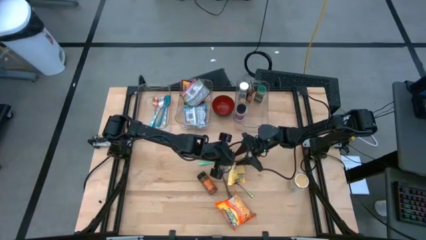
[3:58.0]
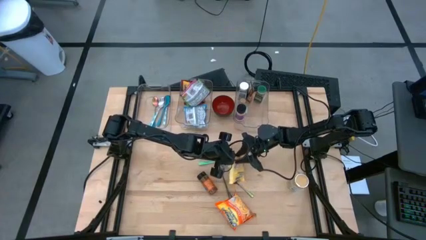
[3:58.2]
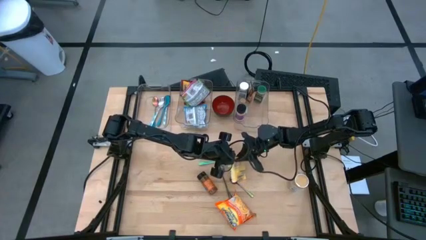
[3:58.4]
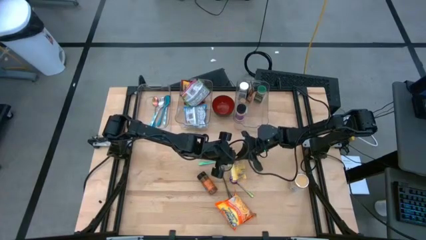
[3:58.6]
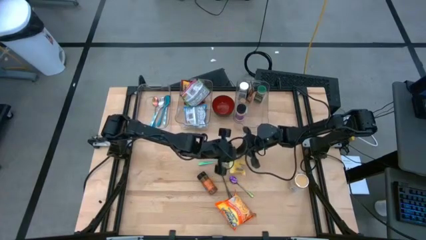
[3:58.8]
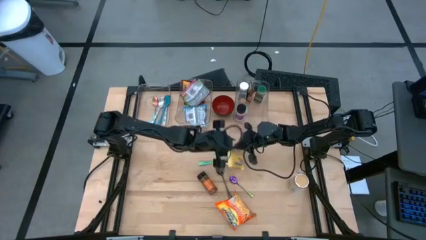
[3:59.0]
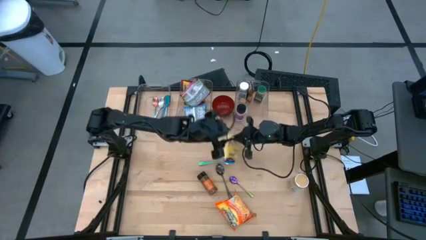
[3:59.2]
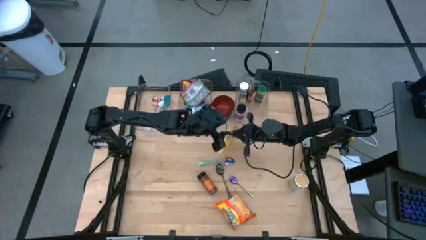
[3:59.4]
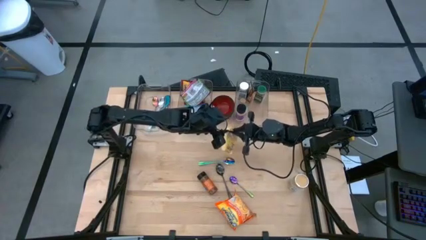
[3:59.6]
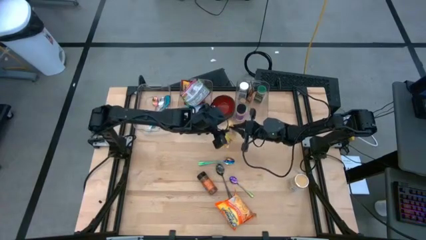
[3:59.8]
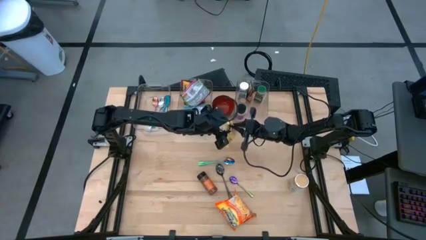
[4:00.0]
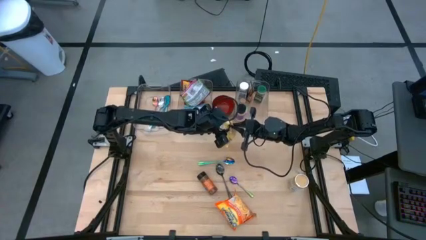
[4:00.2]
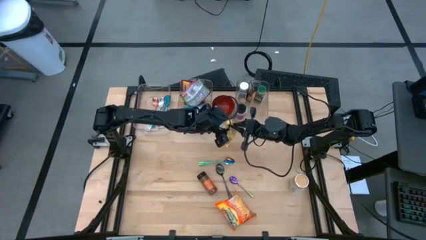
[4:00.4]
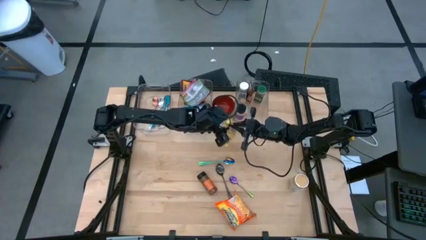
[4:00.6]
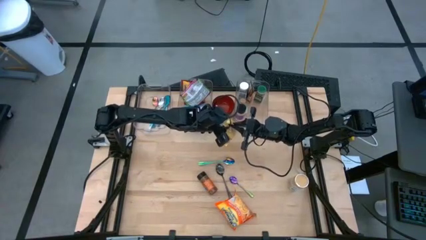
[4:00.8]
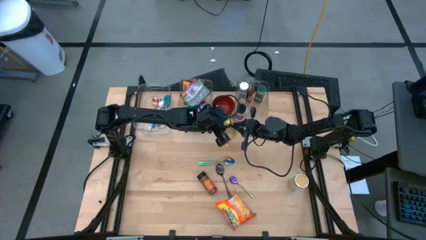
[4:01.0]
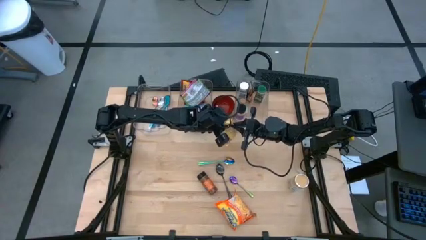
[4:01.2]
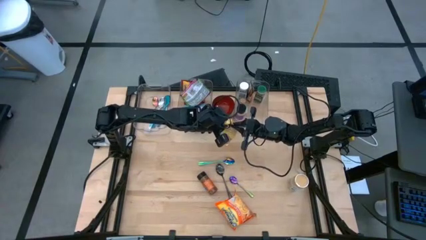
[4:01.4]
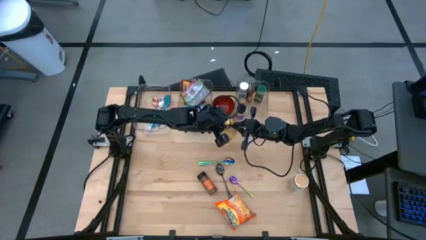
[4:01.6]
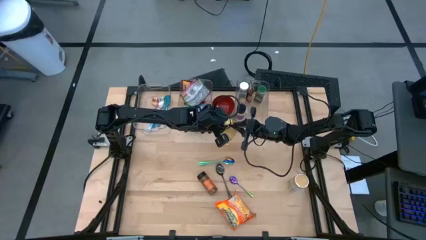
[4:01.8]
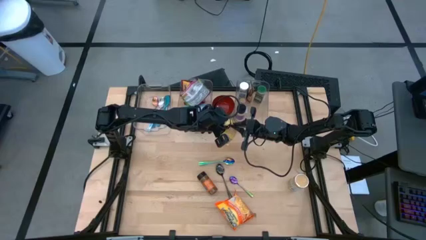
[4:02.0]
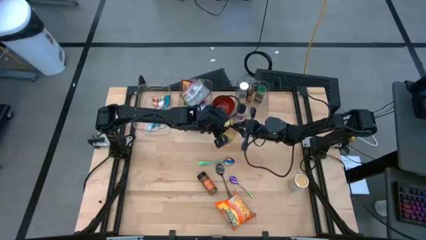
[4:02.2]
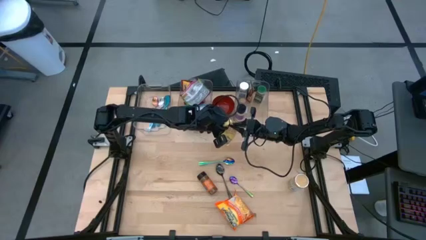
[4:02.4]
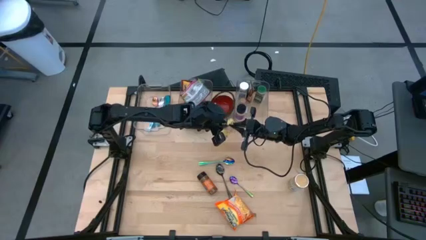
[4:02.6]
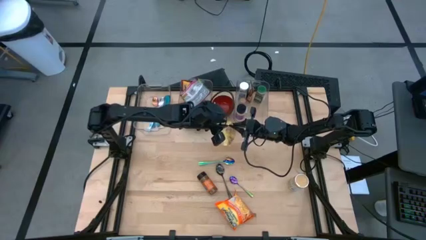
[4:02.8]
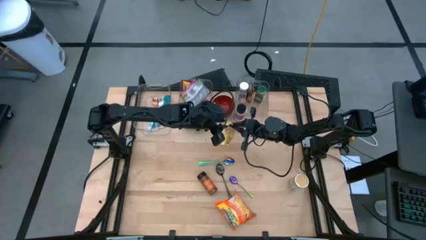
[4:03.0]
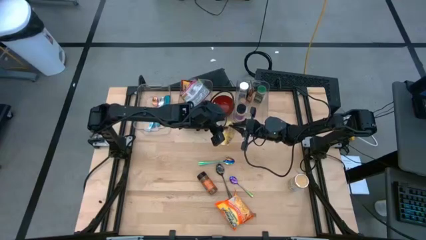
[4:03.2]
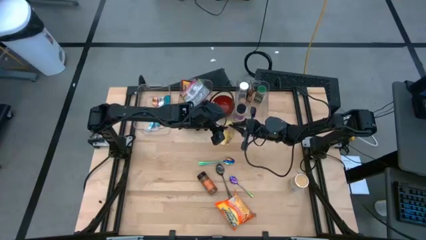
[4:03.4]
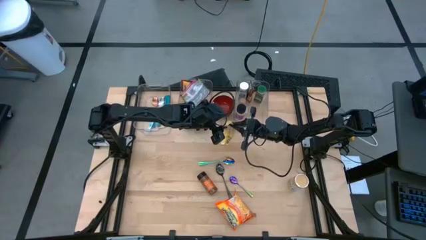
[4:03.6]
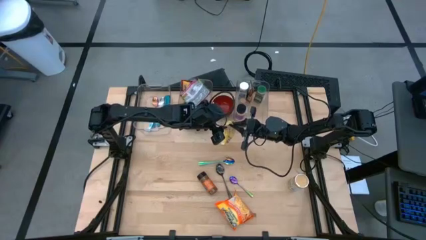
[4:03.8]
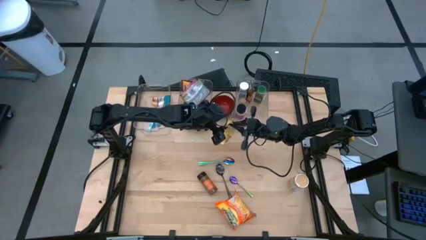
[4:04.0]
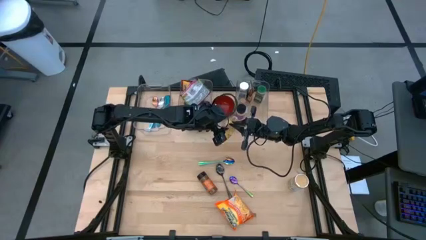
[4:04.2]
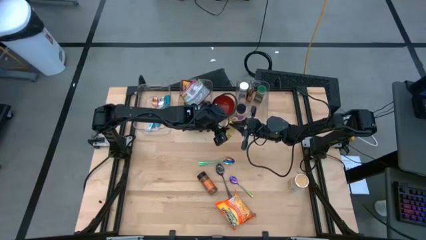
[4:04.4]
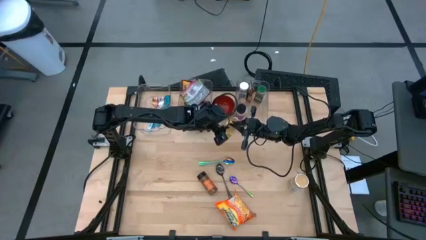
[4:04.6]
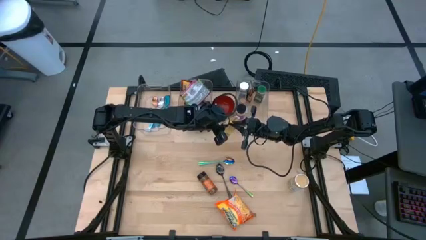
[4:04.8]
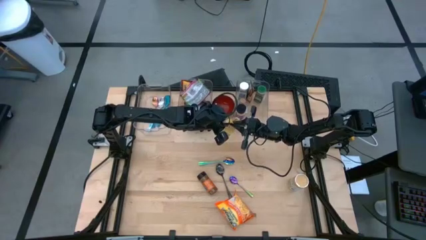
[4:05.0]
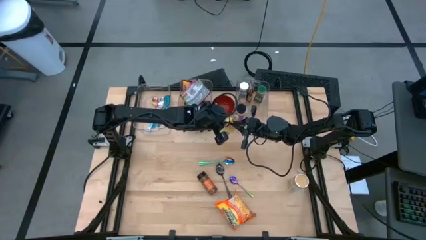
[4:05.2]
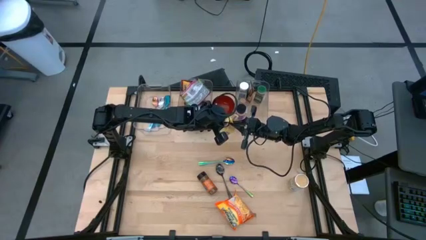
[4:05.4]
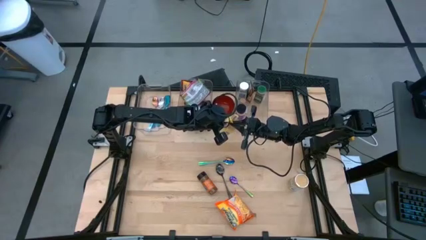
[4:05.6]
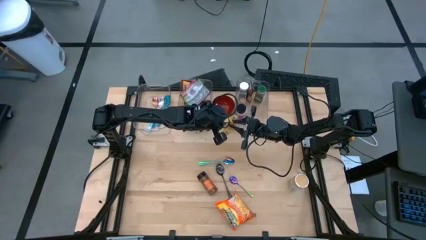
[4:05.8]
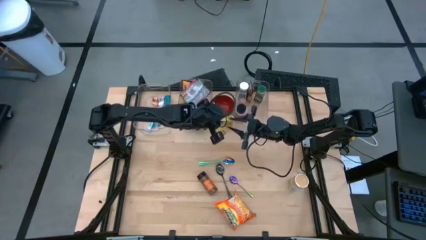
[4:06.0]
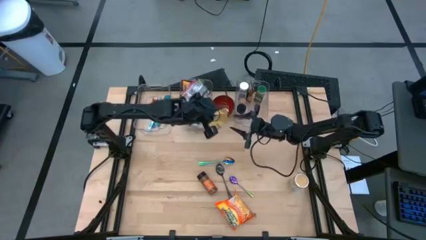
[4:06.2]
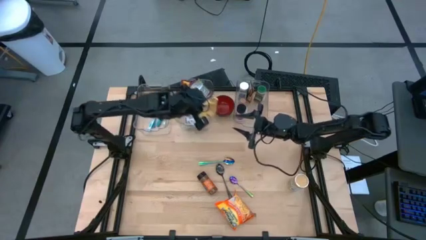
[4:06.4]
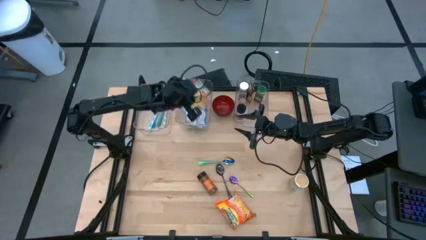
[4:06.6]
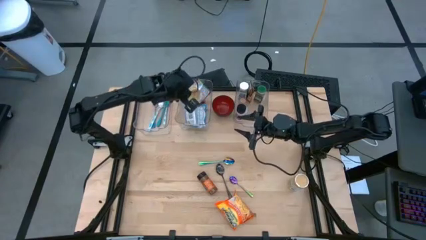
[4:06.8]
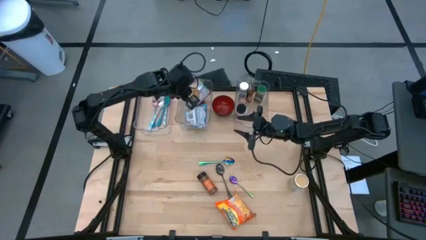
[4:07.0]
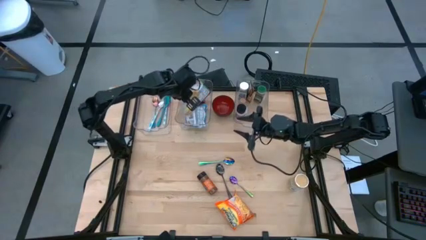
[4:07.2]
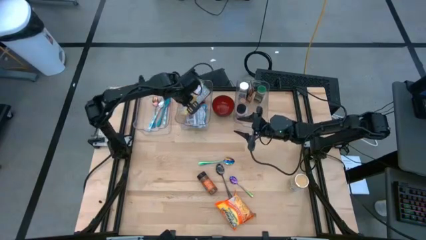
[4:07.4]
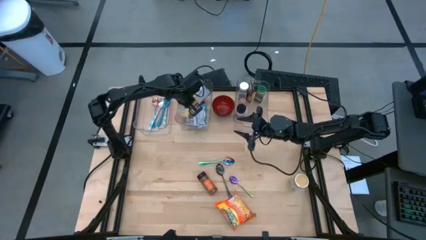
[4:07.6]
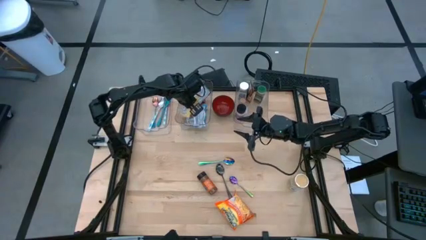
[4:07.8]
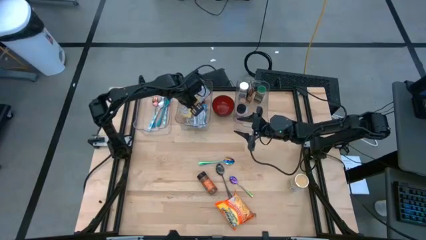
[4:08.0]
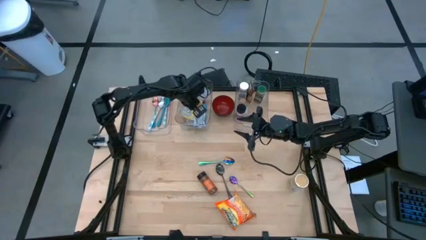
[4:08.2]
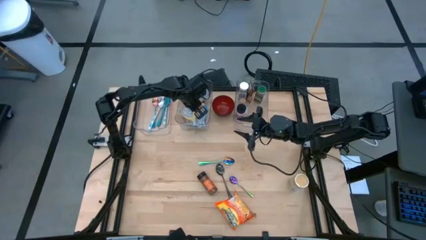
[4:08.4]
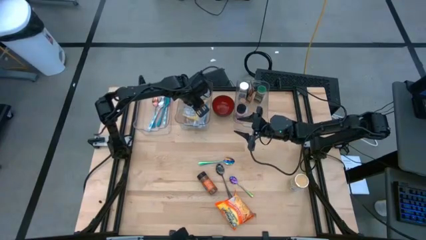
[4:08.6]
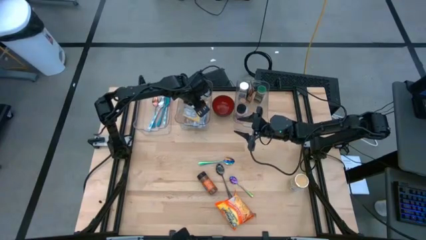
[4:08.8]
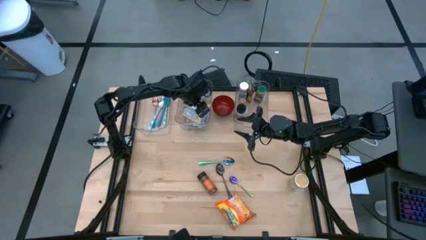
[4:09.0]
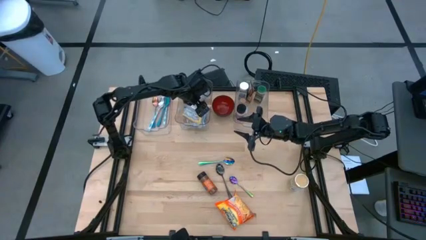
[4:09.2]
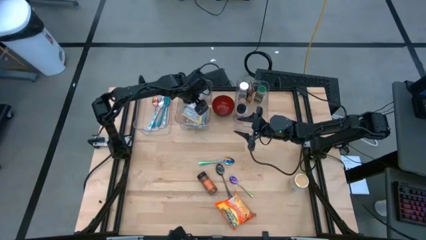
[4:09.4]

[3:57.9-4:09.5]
Task: Pick & Place Food Item
Put the yellow noodle pack into the middle transparent bin
